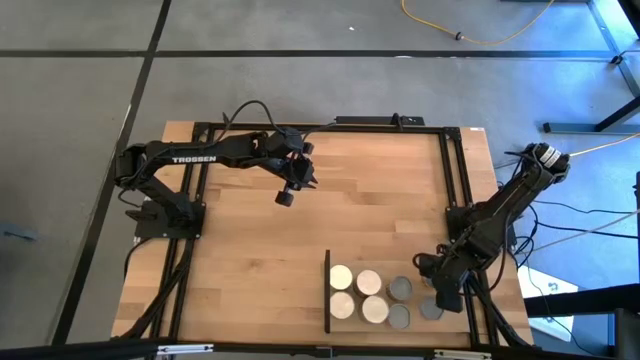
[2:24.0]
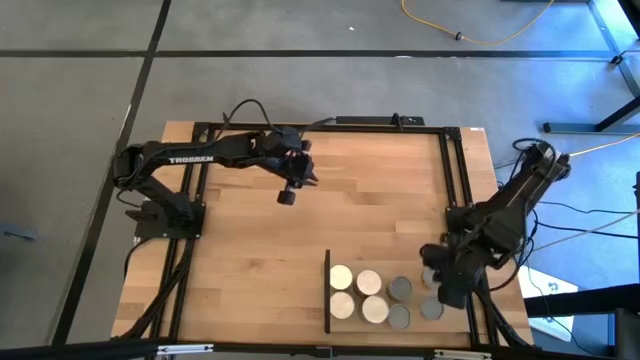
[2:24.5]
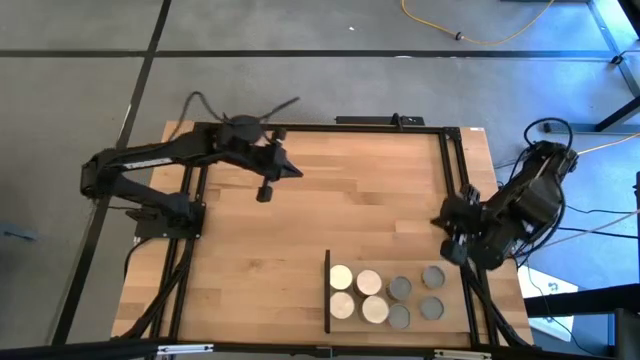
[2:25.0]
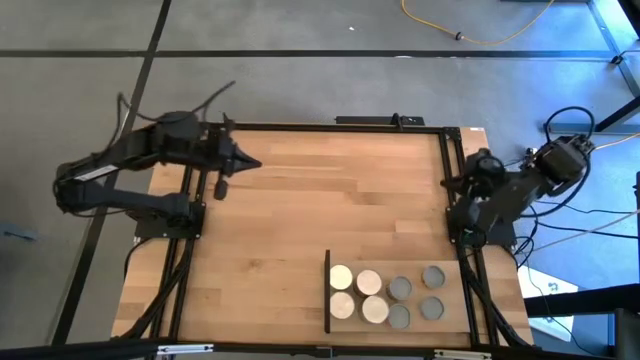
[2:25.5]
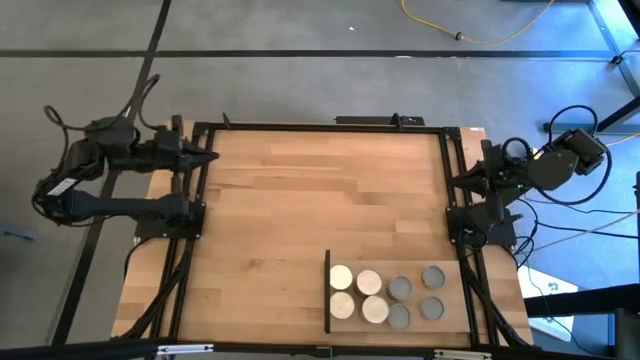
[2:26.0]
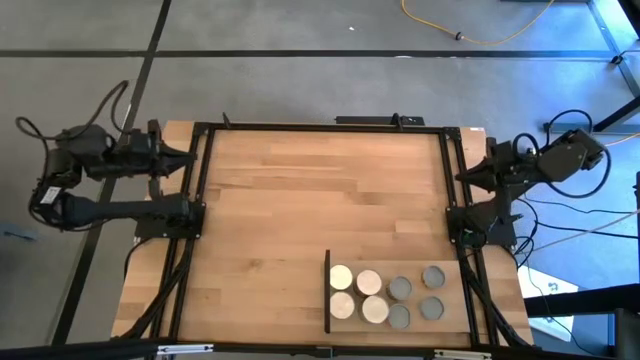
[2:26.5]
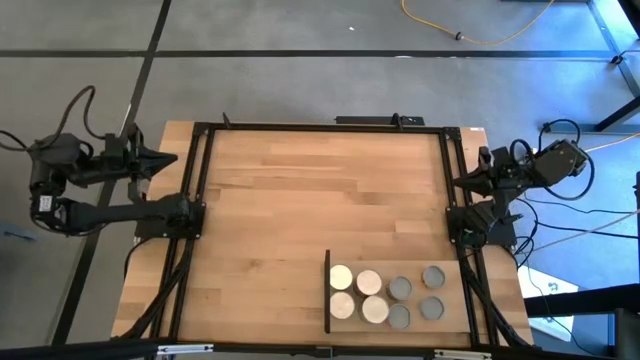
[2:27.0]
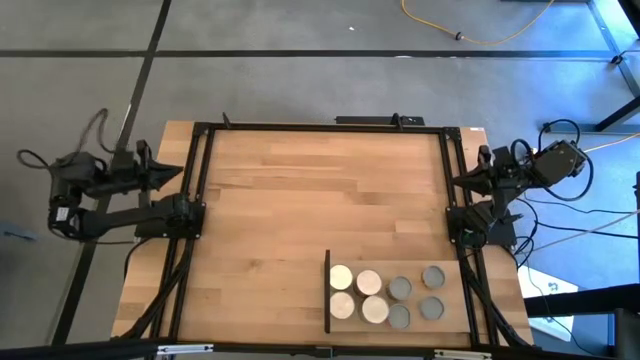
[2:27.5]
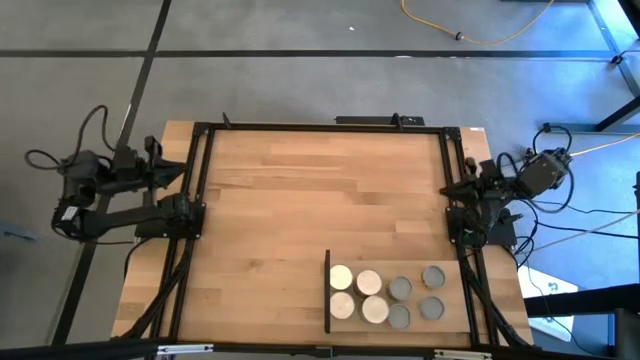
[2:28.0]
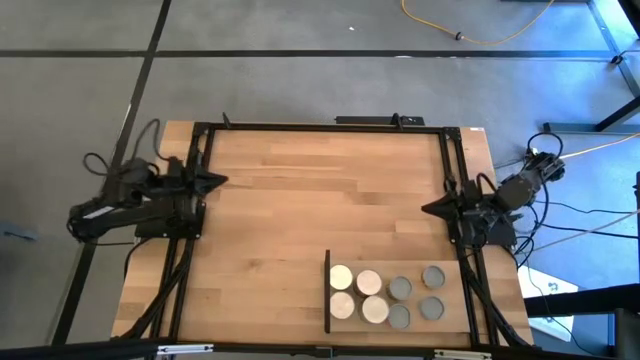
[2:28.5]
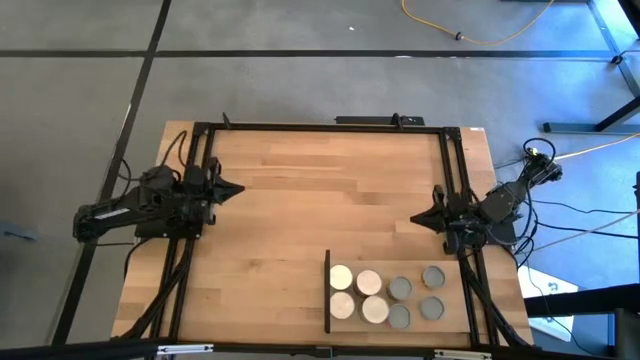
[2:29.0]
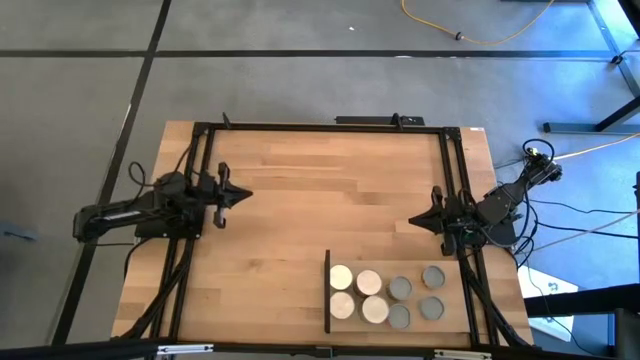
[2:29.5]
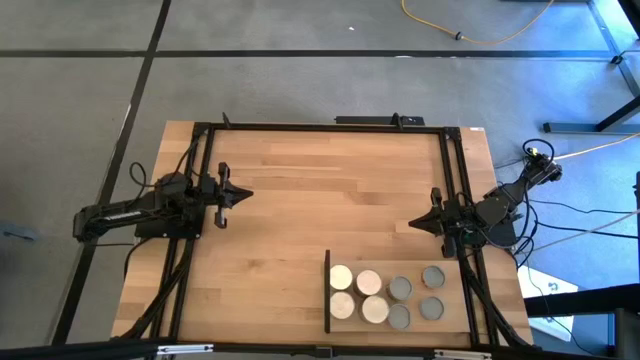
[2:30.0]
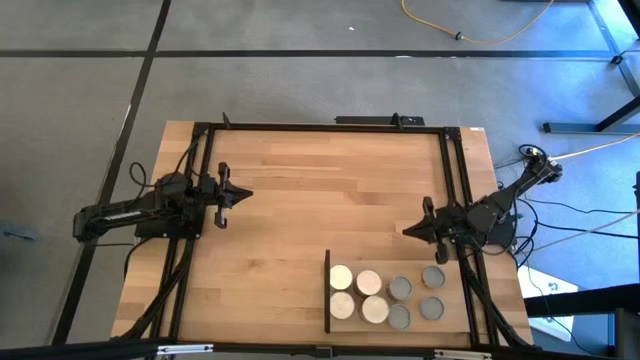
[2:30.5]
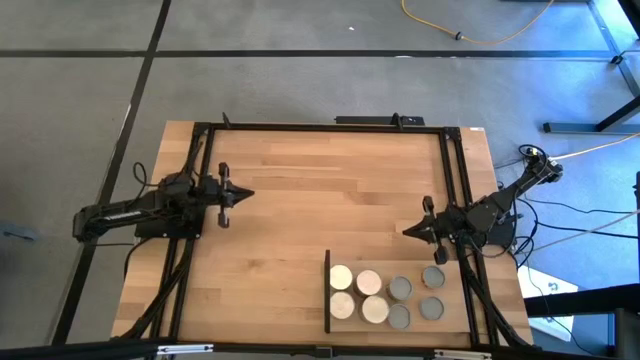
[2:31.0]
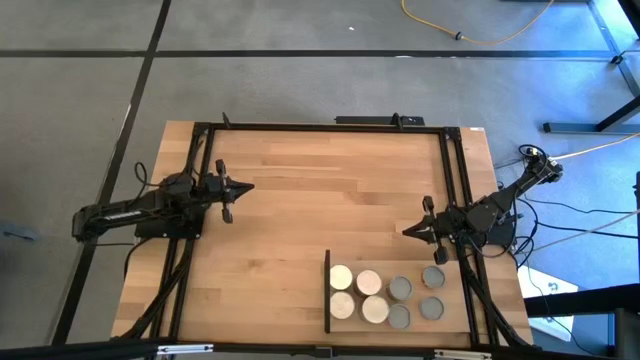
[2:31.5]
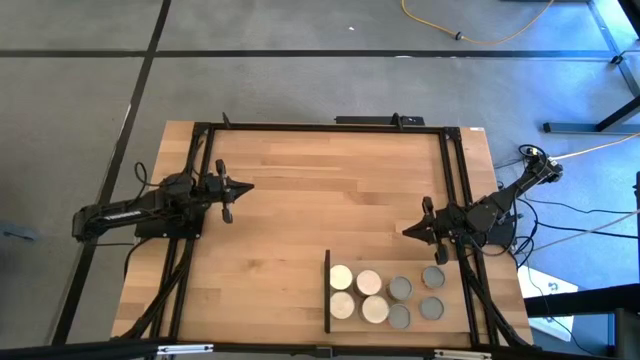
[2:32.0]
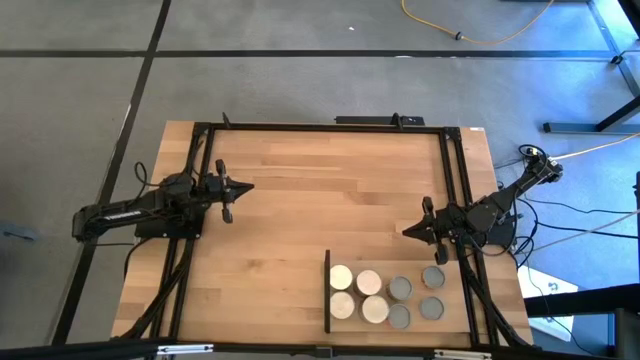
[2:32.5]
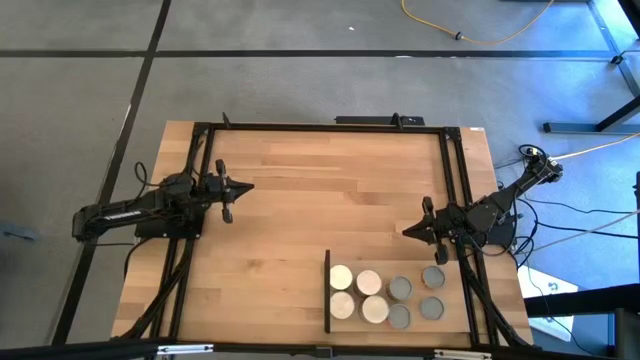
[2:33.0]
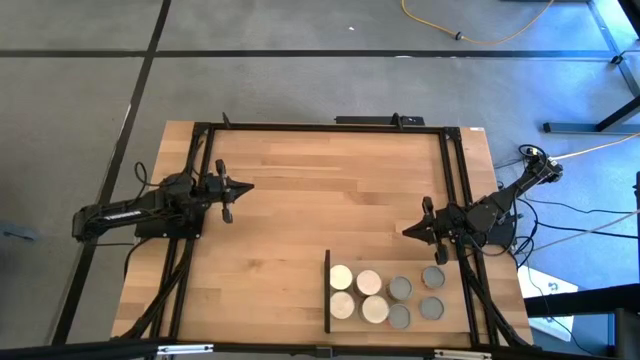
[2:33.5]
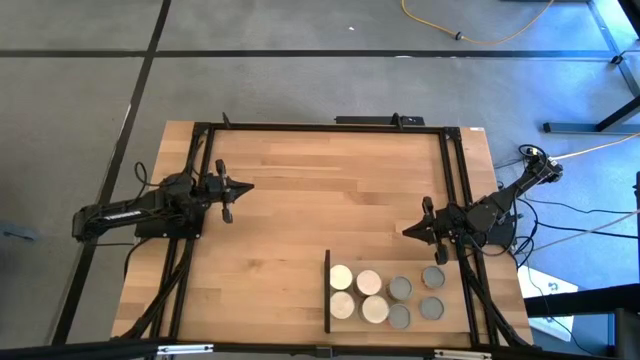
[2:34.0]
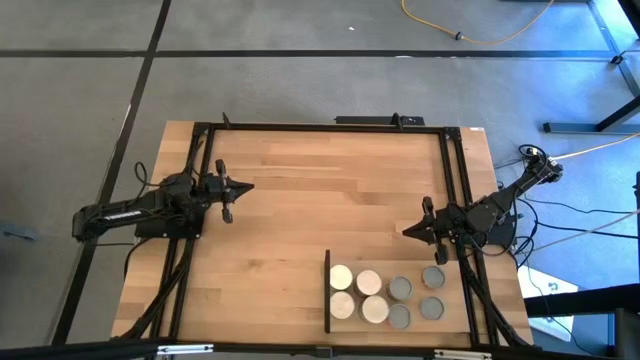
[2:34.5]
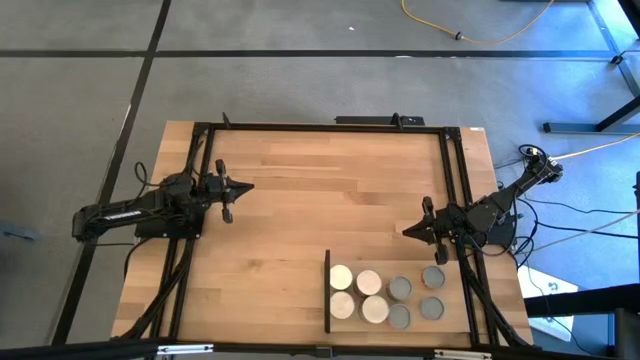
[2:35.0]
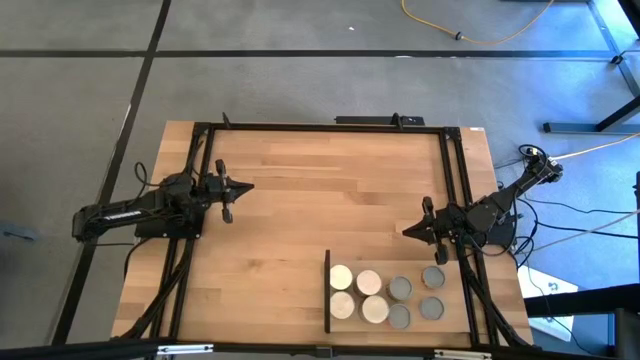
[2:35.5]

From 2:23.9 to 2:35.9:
Task: Pick and place cans onto a shelf
Return to Home Position

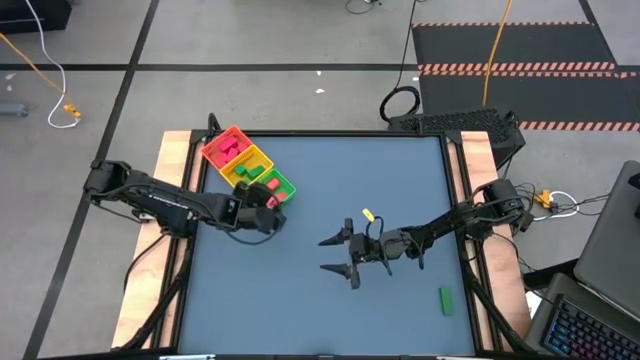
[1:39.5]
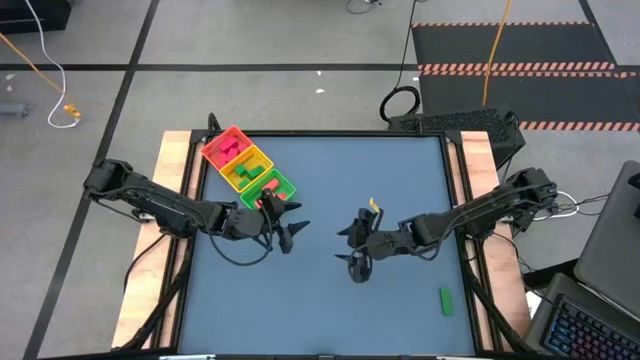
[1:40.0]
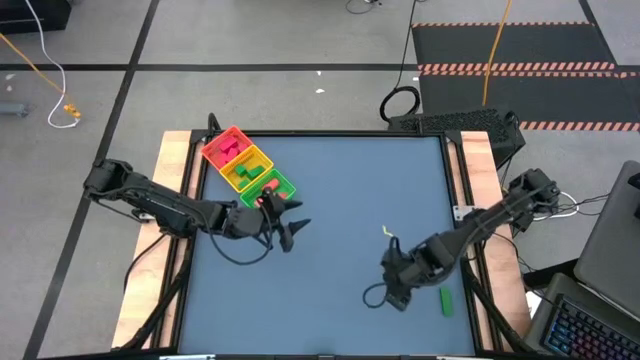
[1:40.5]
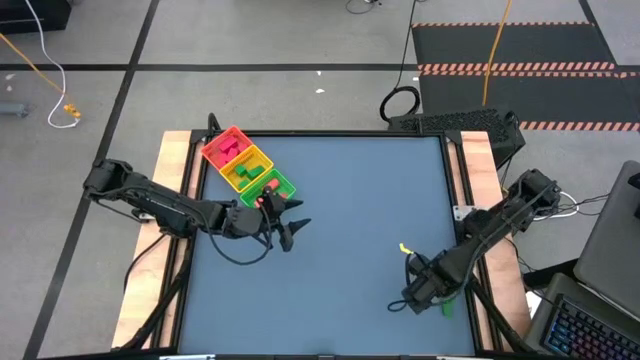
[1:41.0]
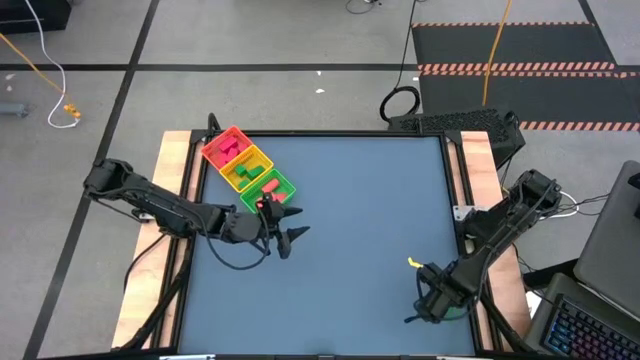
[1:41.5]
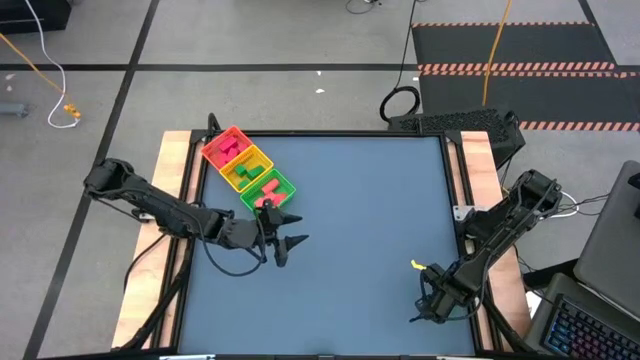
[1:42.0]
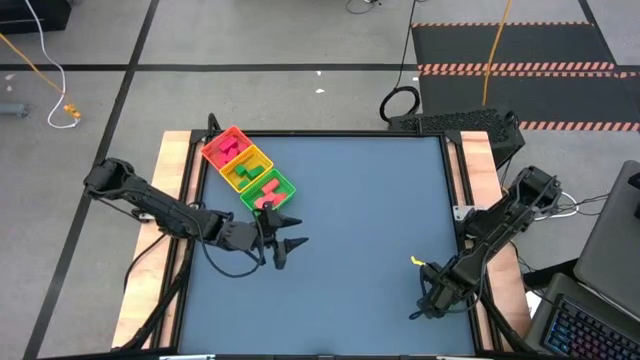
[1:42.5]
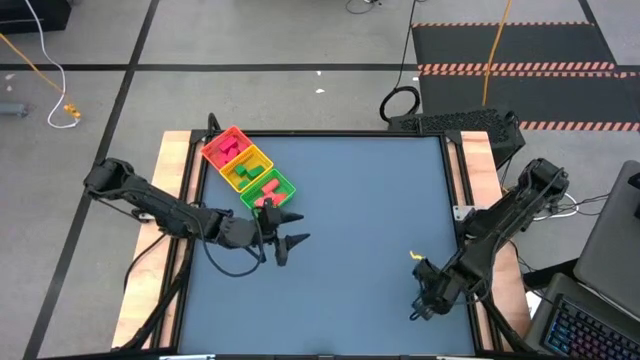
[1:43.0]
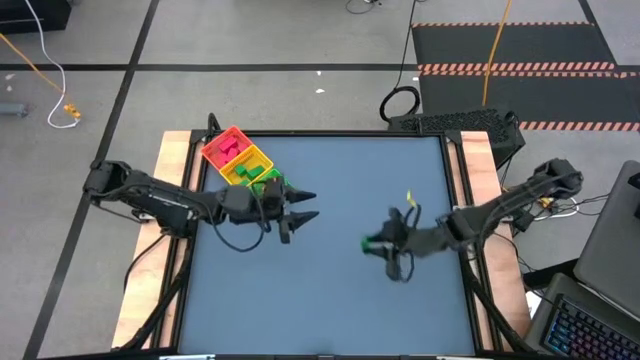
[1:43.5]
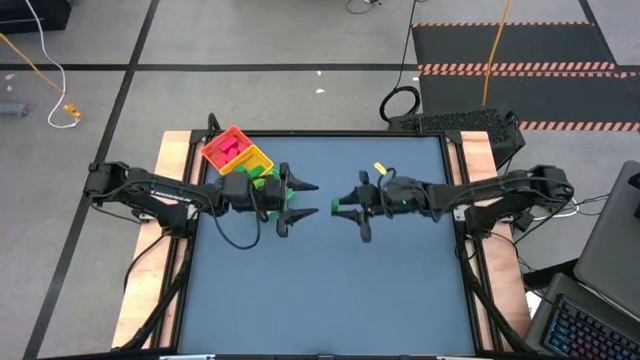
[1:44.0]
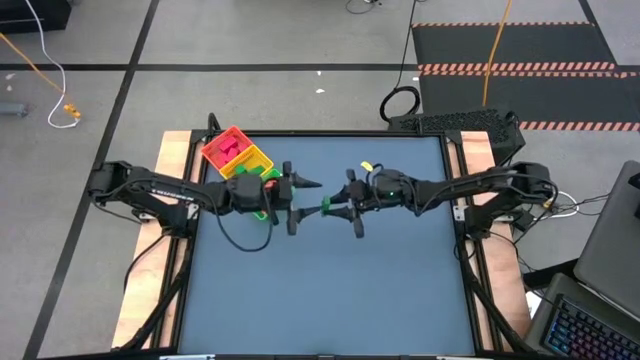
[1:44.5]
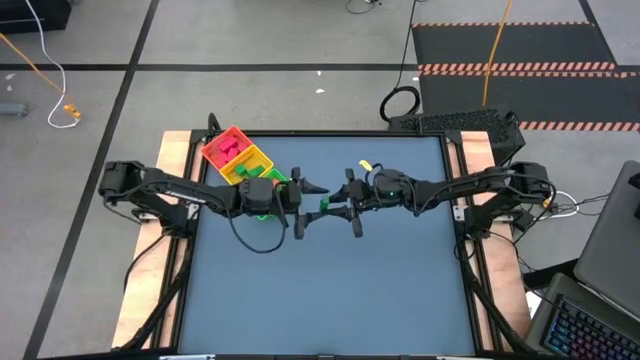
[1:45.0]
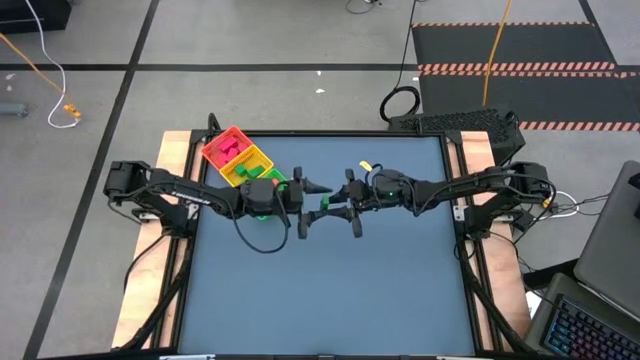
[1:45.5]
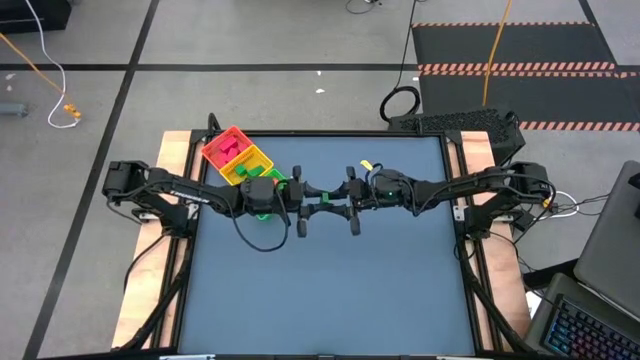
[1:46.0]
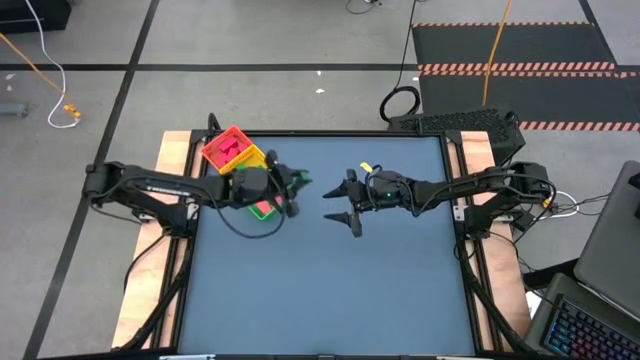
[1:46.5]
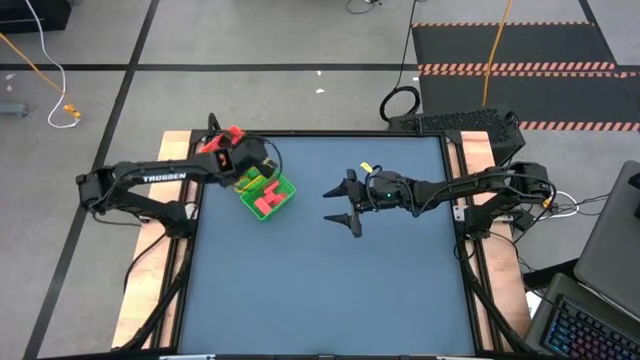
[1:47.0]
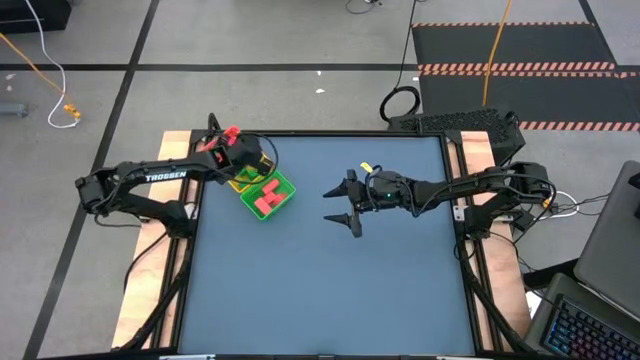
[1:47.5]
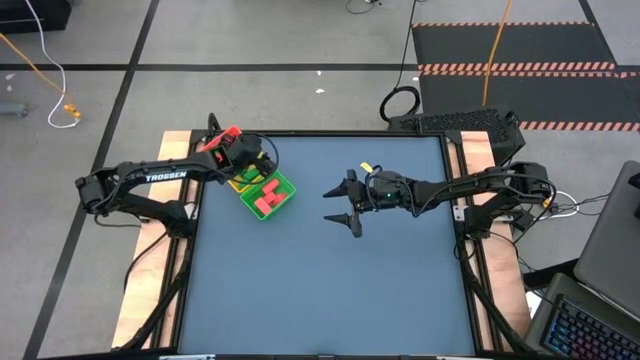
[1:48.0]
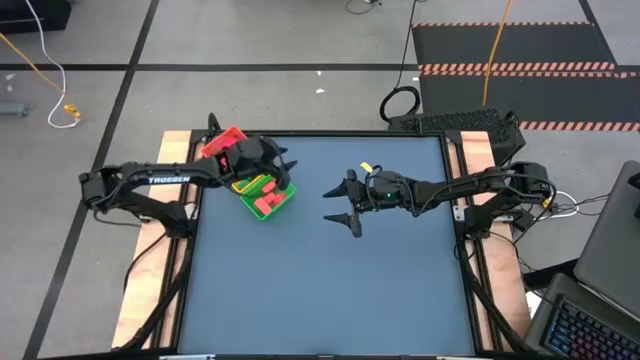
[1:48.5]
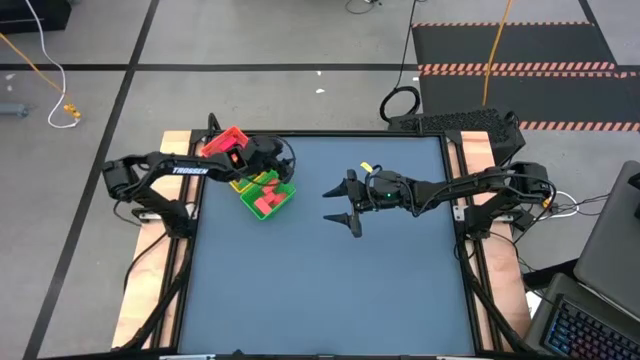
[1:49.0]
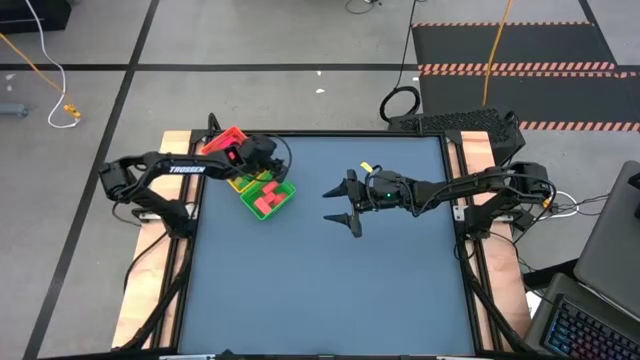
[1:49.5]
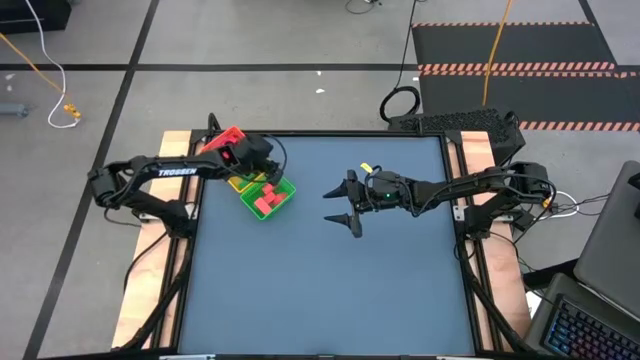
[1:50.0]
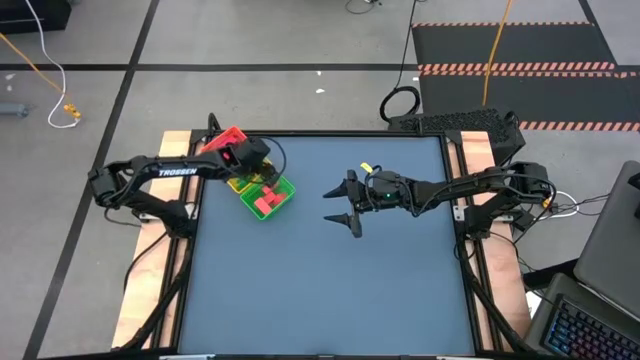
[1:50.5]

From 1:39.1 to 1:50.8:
Task: Sort & place blocks by color
Put the green block into the yellow basket
